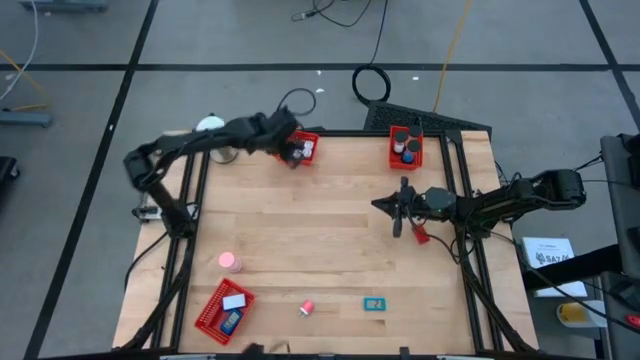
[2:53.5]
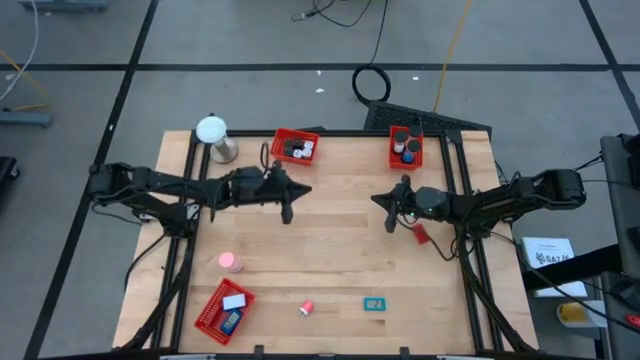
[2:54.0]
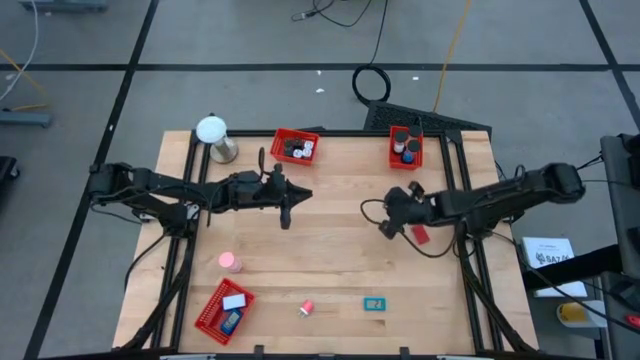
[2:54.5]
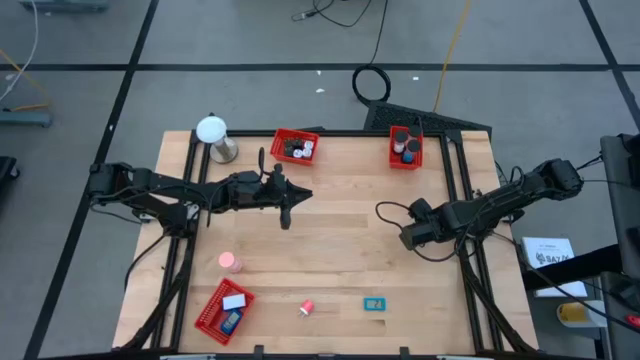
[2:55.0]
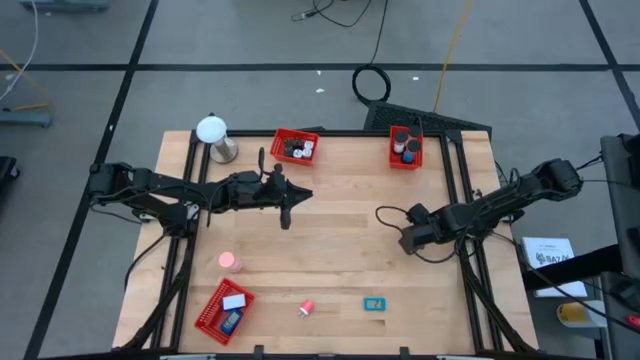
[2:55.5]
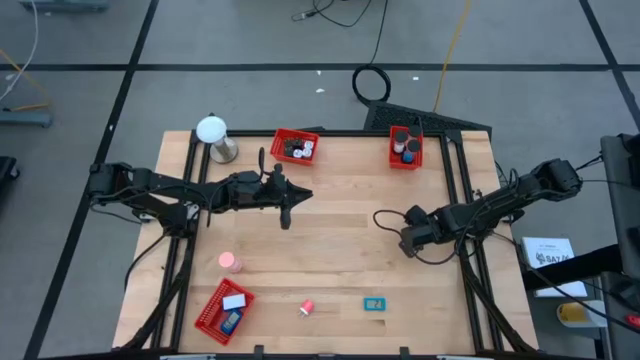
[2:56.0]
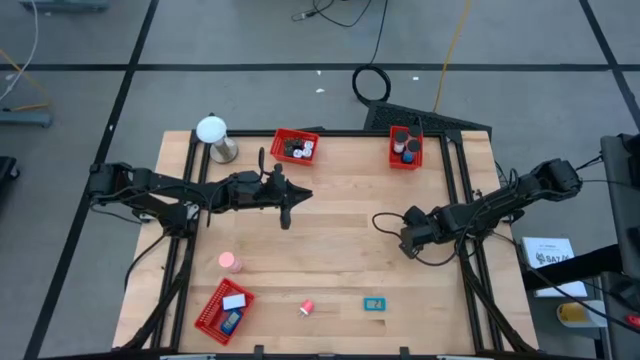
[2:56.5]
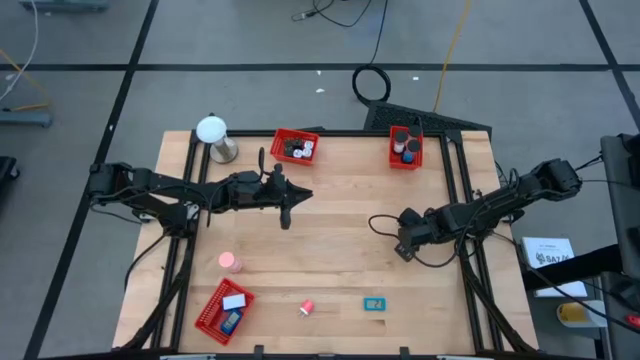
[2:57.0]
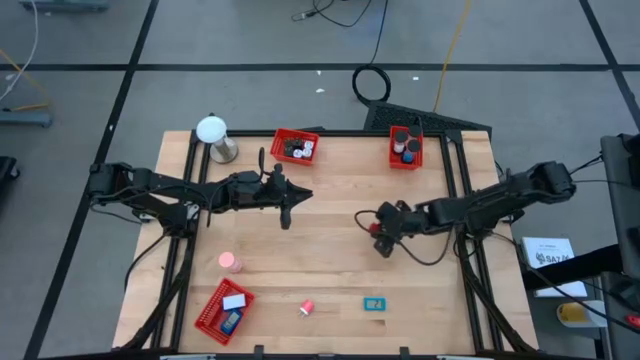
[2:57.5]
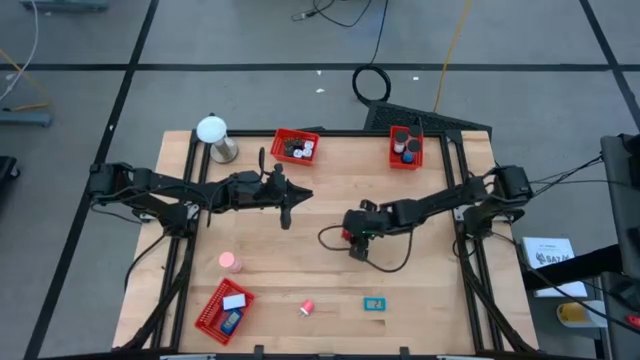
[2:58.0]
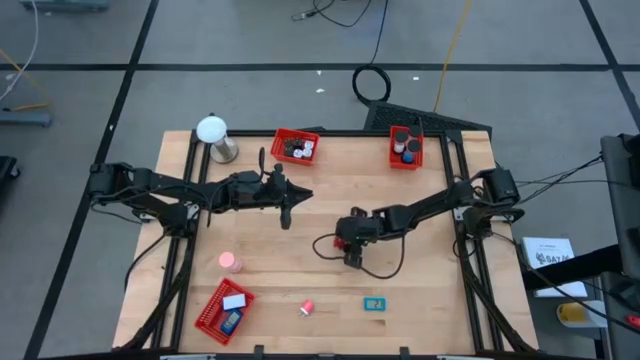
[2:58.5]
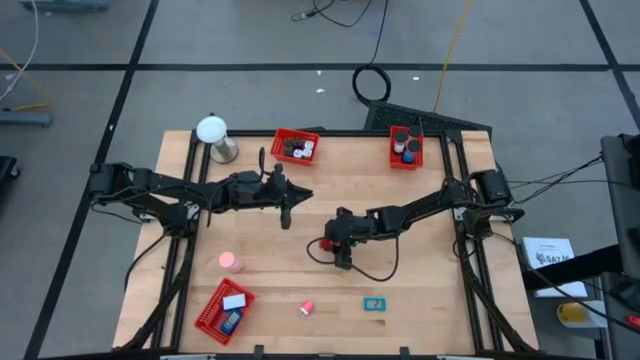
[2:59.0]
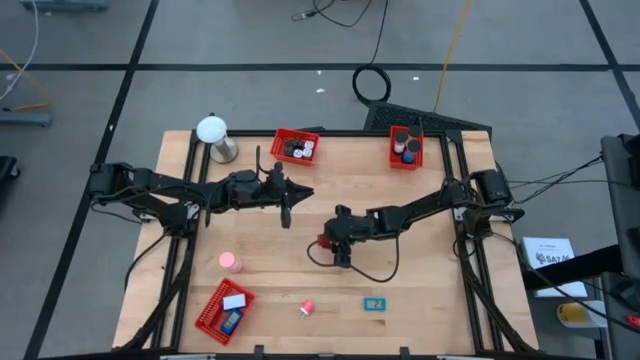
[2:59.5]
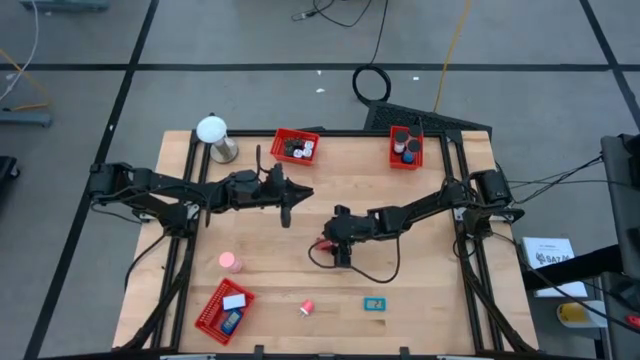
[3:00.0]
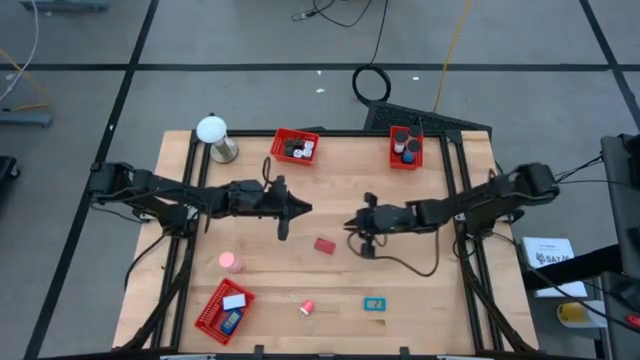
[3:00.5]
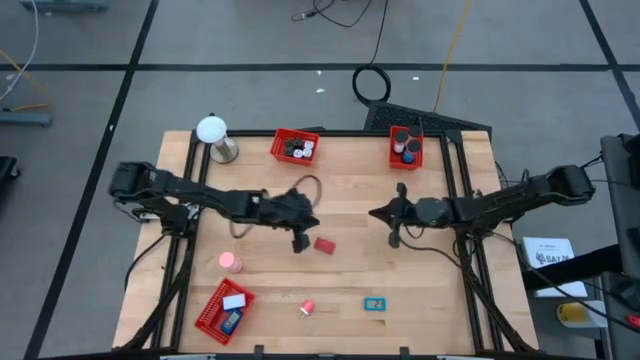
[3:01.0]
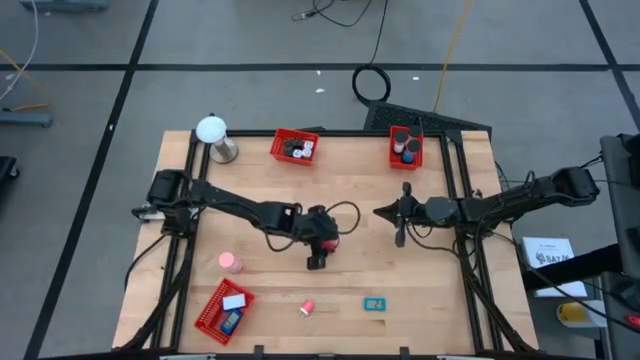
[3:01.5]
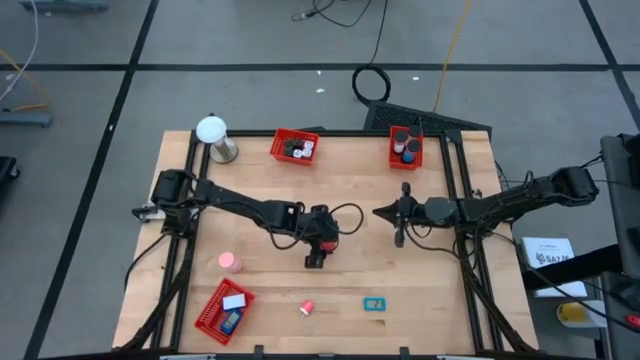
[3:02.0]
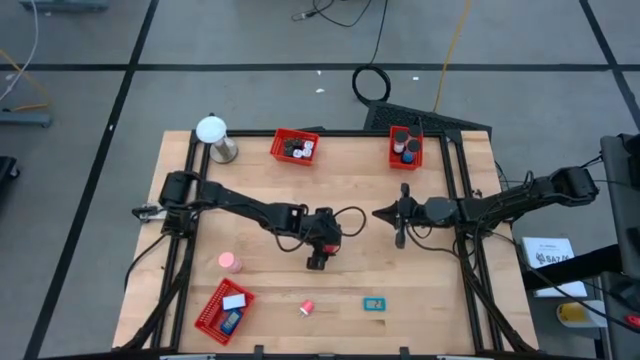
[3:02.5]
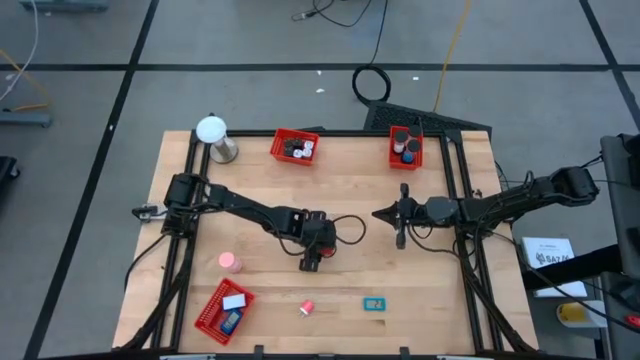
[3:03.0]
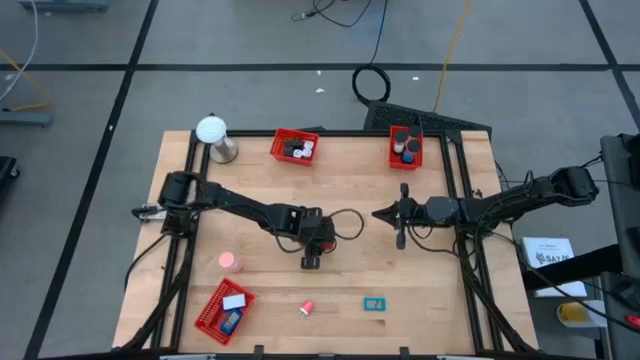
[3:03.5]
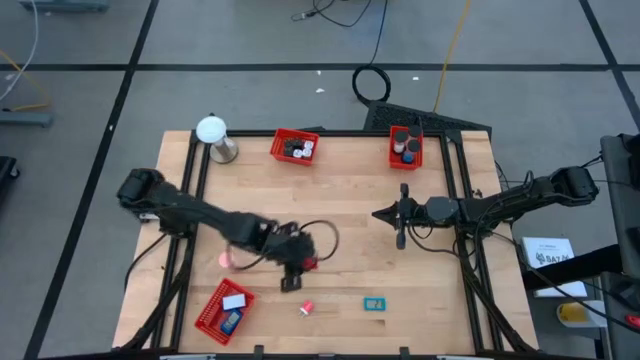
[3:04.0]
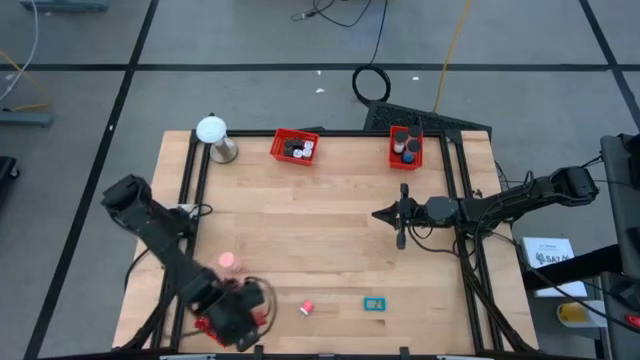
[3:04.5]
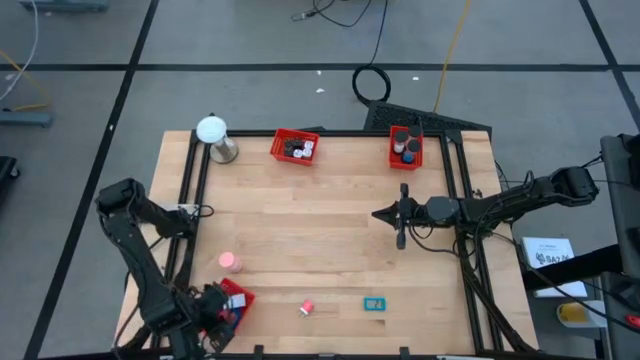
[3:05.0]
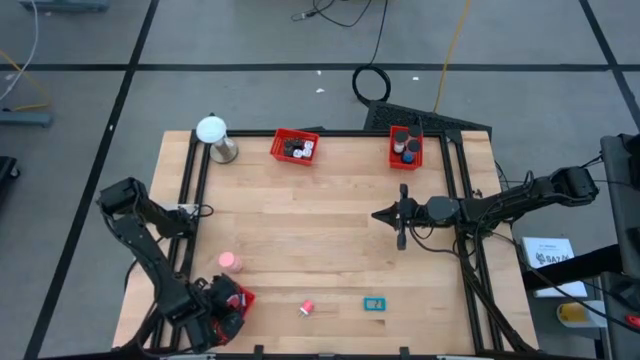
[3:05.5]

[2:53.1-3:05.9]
Task: Pick & Place Office items
Put the red timer into the bottom red basket

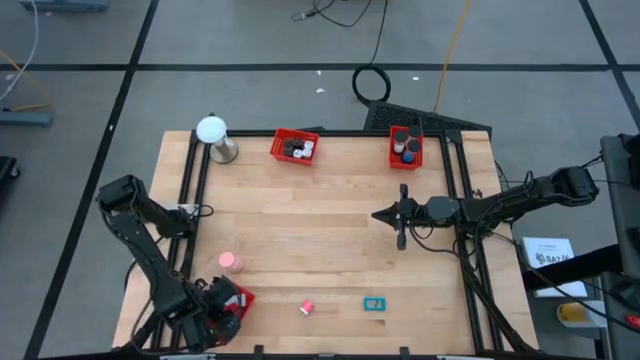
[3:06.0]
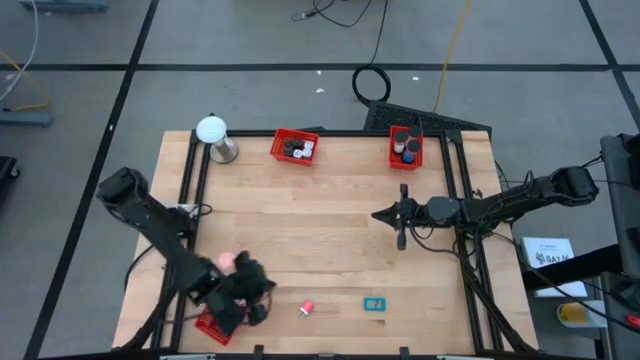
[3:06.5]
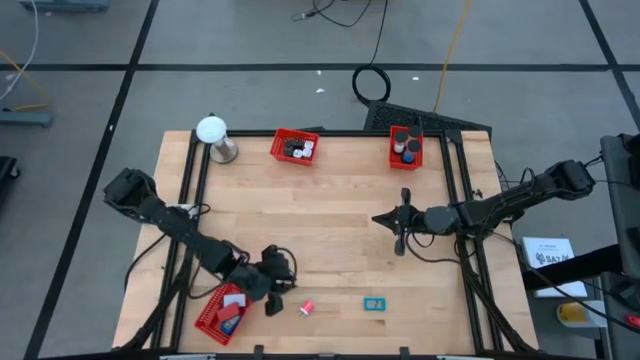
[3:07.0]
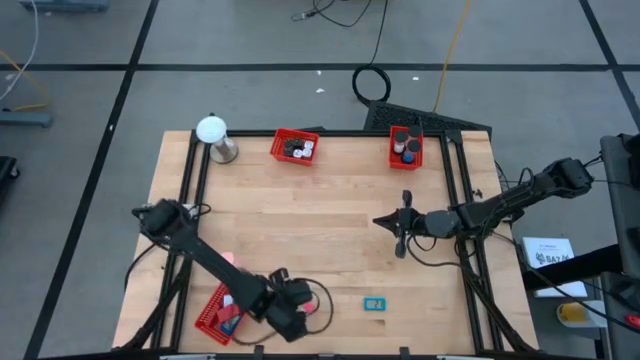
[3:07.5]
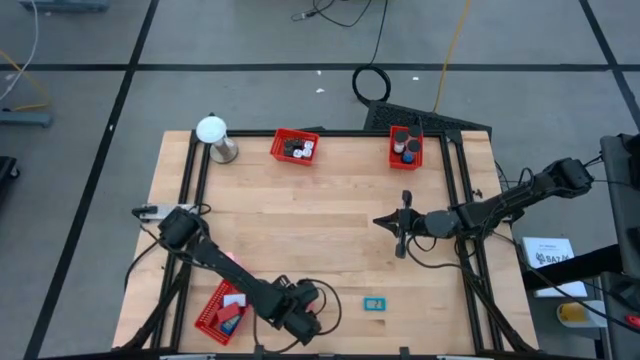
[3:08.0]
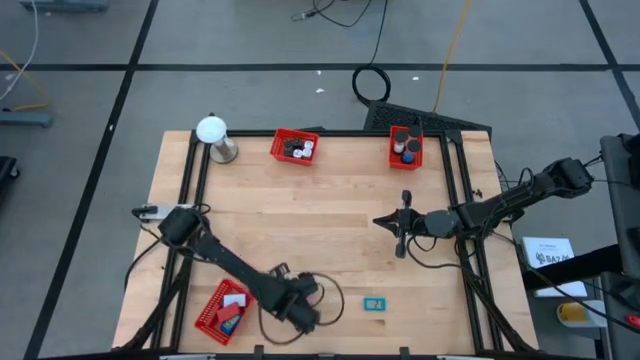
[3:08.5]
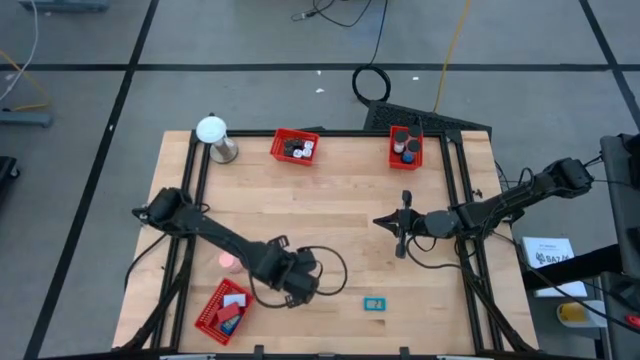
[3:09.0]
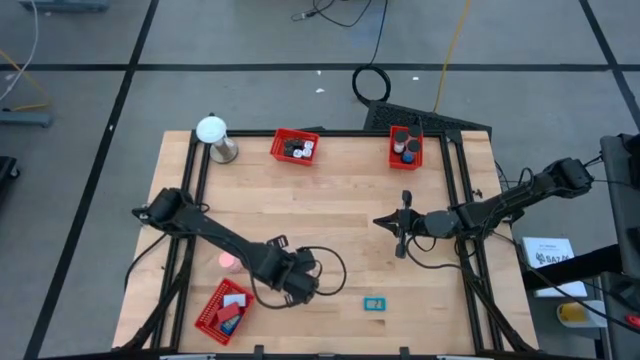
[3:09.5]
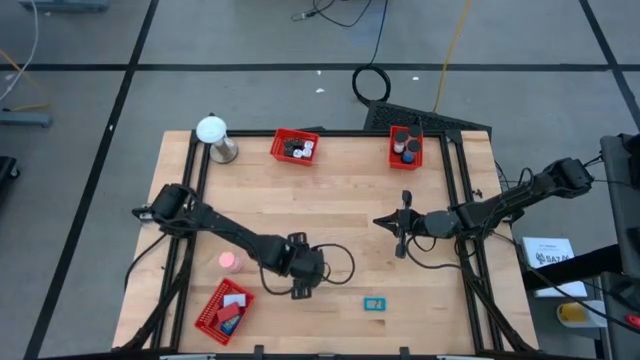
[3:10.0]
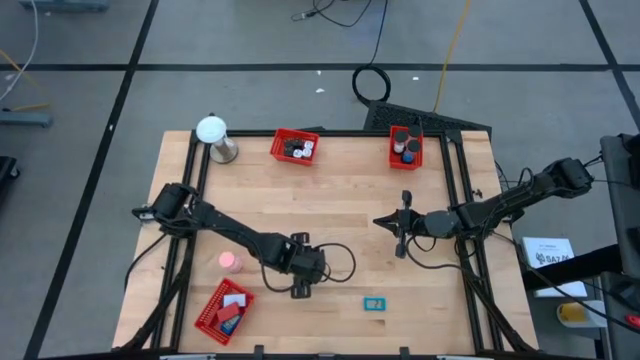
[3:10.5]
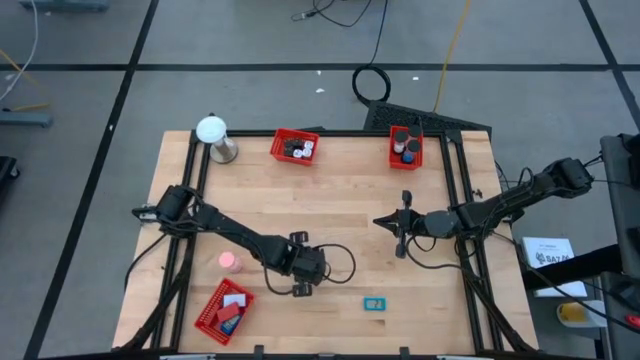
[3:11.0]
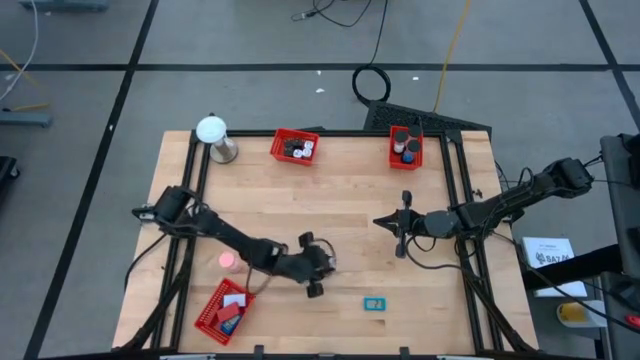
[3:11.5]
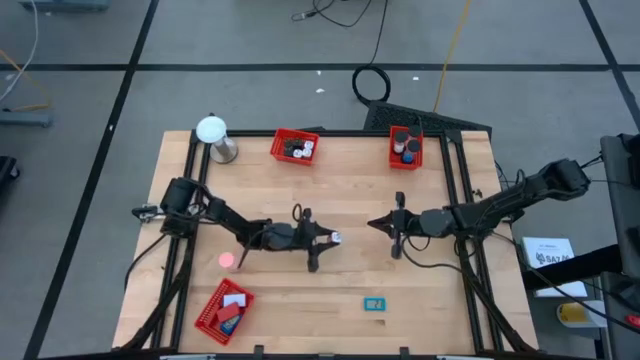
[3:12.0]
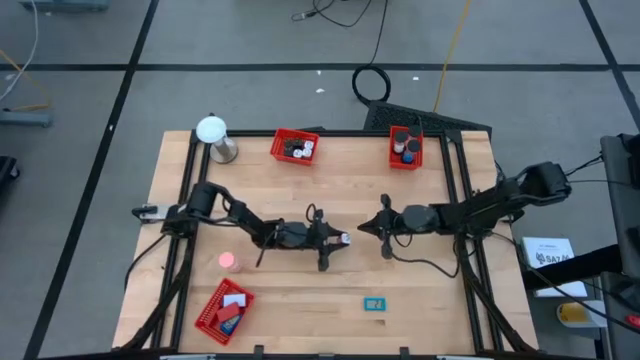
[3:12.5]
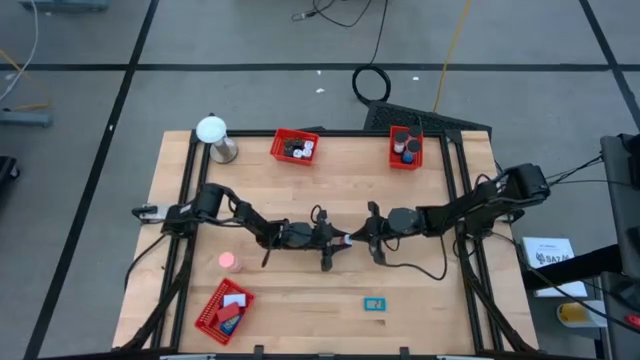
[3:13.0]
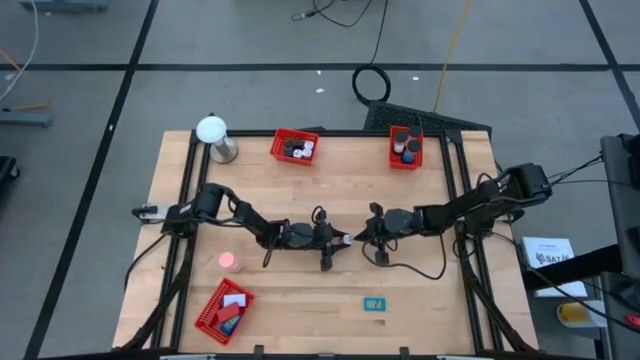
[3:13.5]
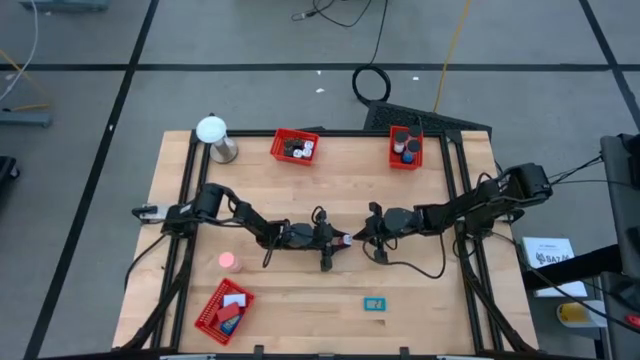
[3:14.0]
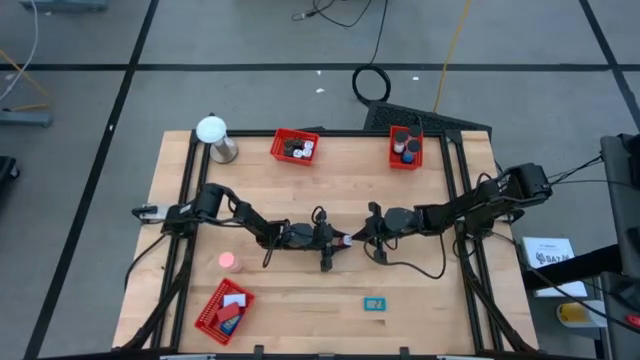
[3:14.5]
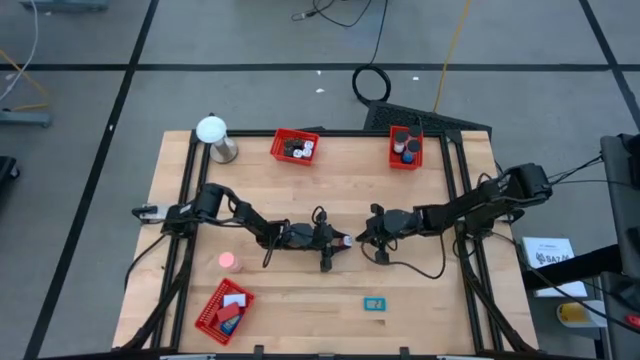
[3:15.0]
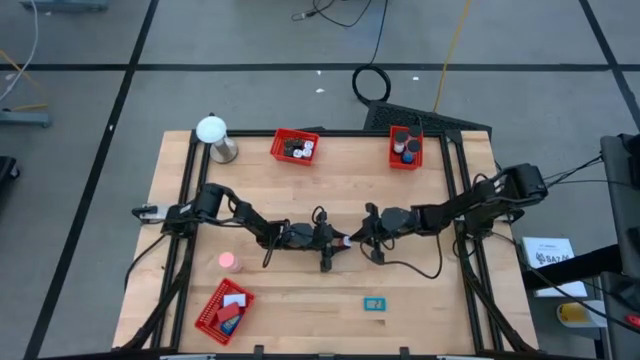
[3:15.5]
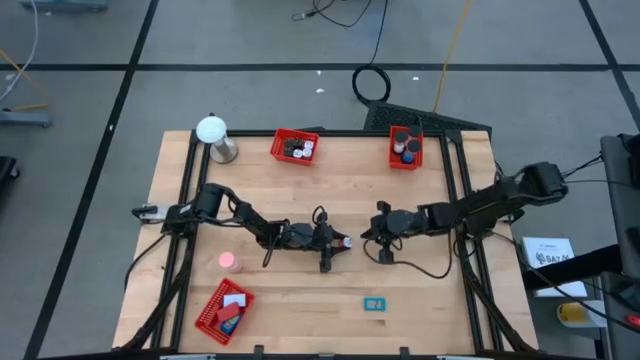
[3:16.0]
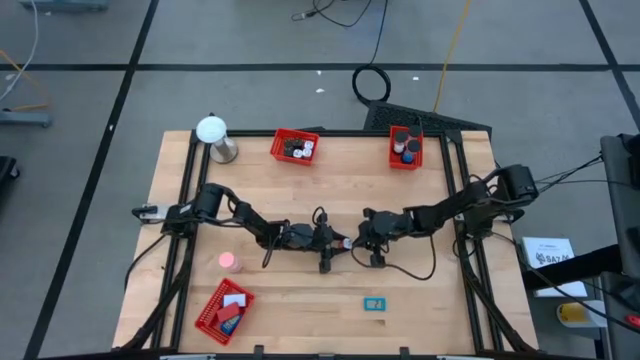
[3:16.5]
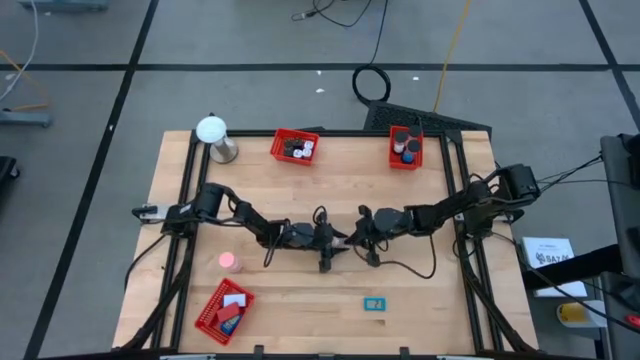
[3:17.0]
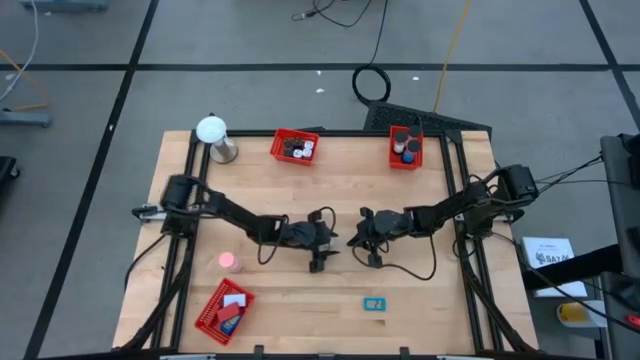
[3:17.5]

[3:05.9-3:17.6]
Put the pink charger adapter into the top left red basket
